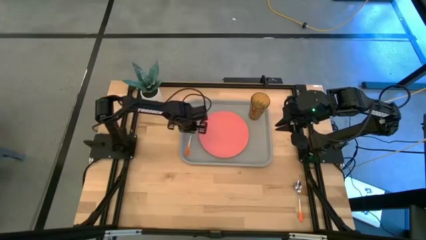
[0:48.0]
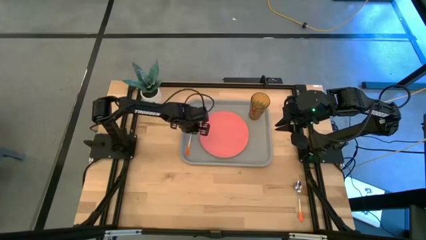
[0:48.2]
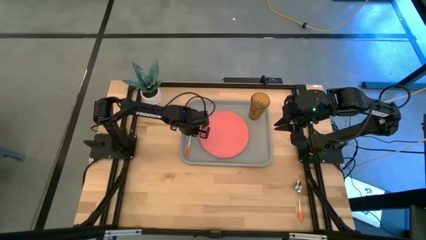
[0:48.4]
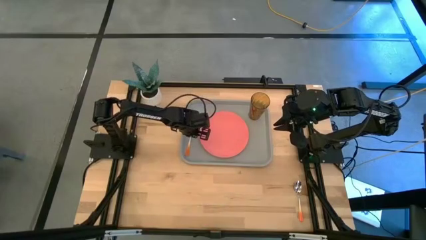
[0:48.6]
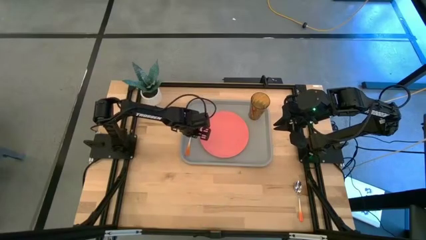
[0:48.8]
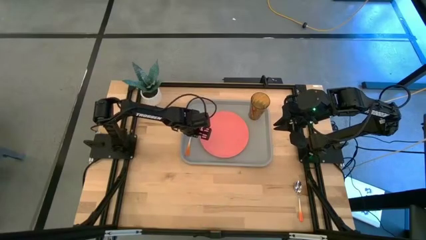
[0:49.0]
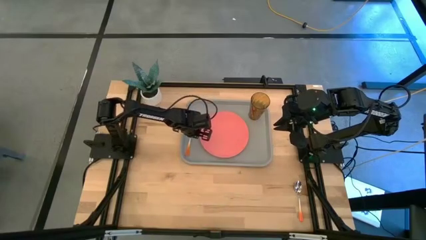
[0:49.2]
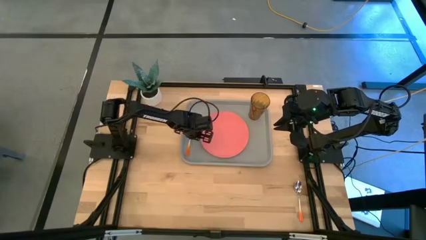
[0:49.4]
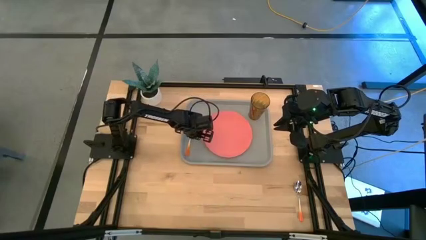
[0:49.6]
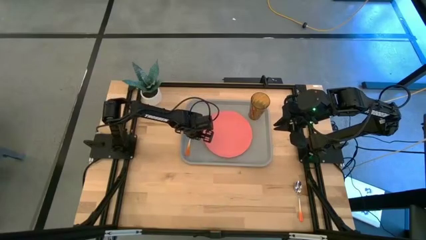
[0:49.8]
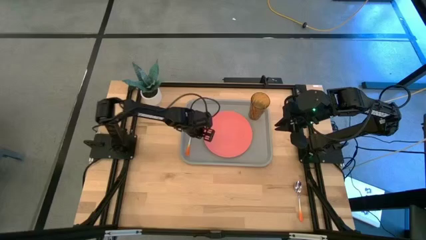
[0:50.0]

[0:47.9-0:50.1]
Task: Pick and place plate/cup/fork/spoon on tray
Adjust the pink plate on the gray serving tray

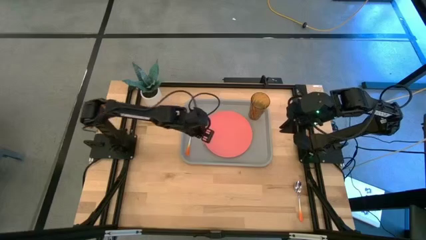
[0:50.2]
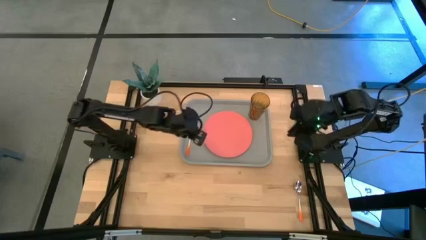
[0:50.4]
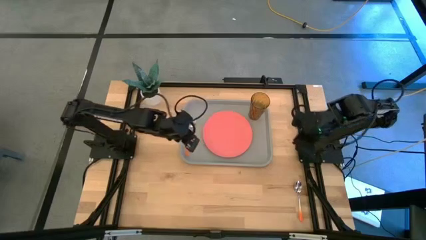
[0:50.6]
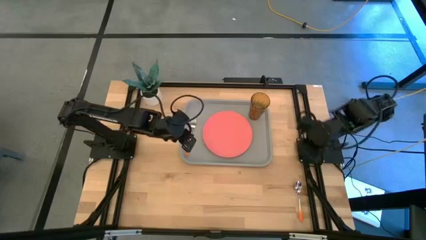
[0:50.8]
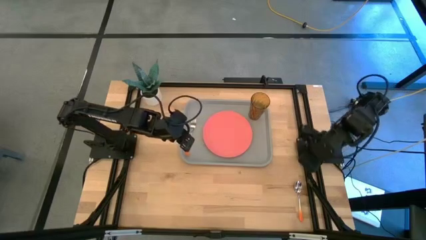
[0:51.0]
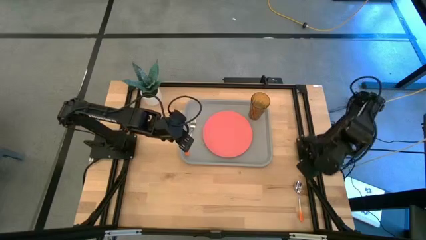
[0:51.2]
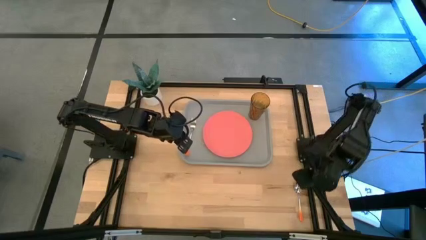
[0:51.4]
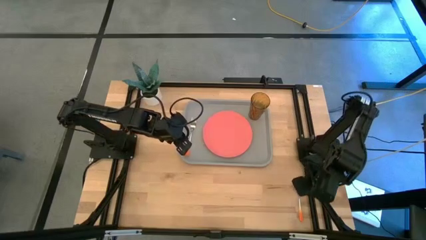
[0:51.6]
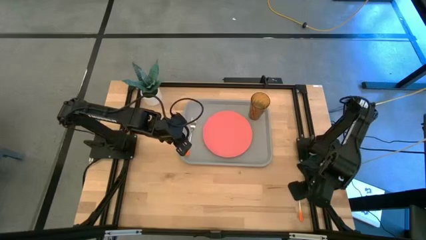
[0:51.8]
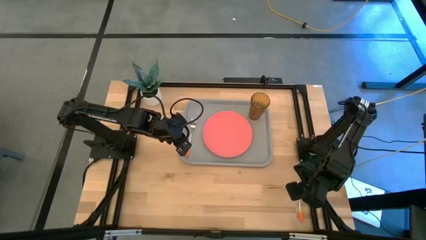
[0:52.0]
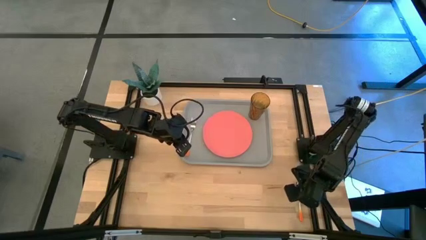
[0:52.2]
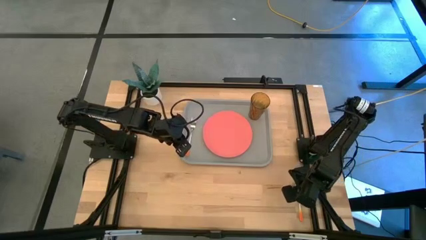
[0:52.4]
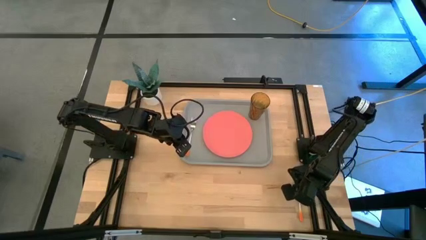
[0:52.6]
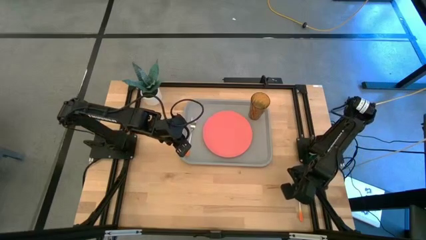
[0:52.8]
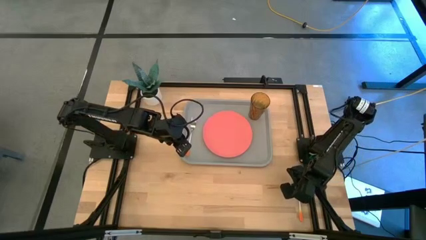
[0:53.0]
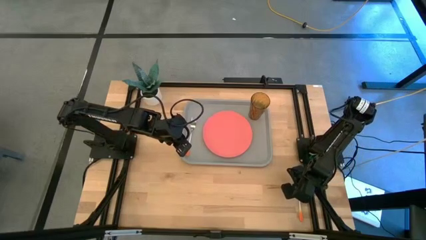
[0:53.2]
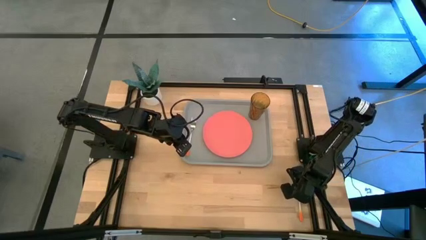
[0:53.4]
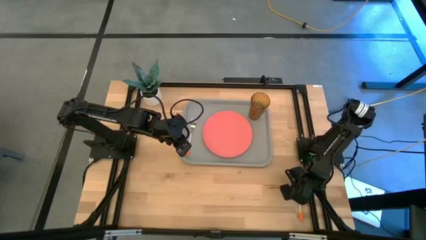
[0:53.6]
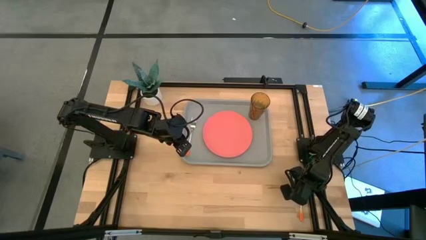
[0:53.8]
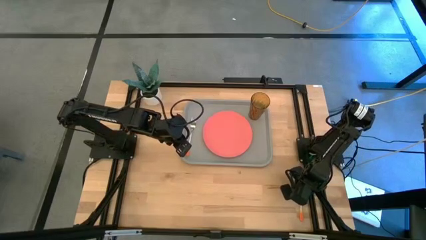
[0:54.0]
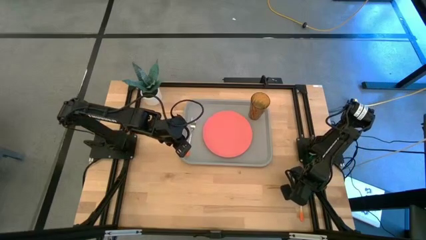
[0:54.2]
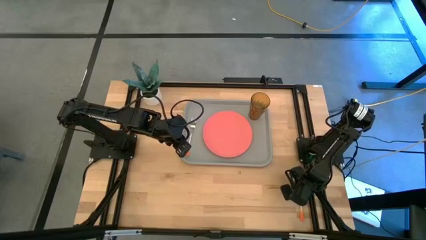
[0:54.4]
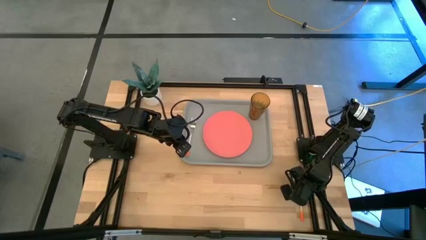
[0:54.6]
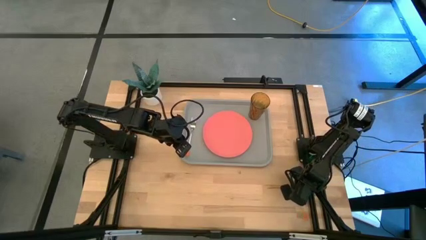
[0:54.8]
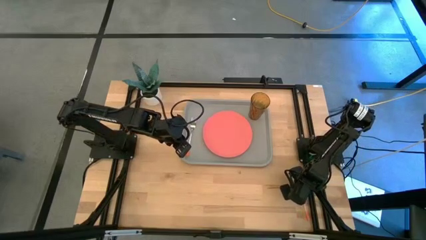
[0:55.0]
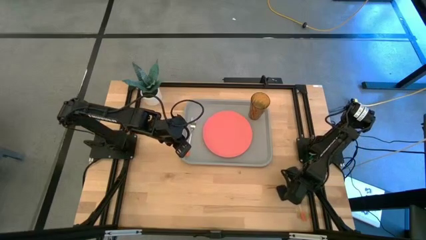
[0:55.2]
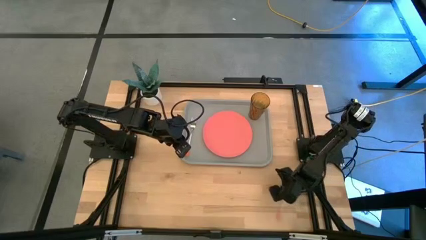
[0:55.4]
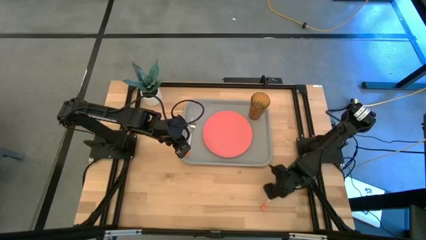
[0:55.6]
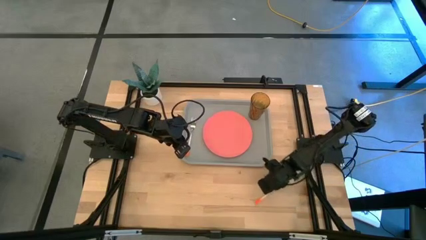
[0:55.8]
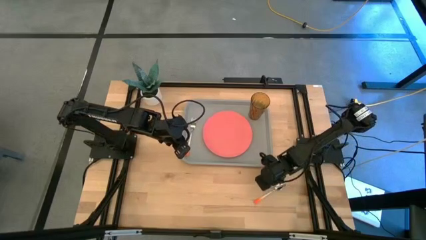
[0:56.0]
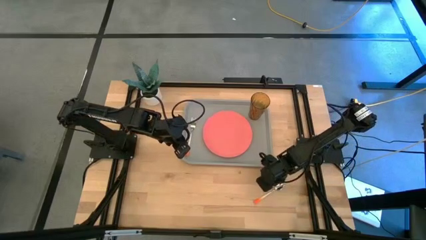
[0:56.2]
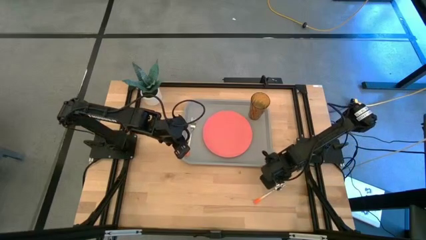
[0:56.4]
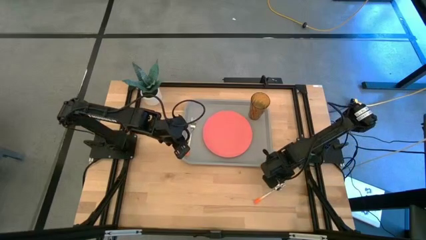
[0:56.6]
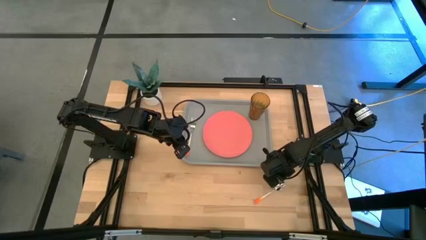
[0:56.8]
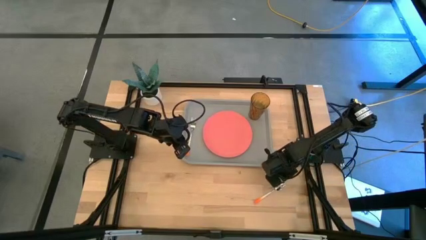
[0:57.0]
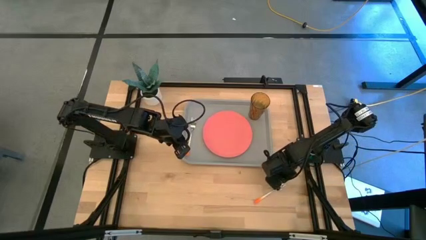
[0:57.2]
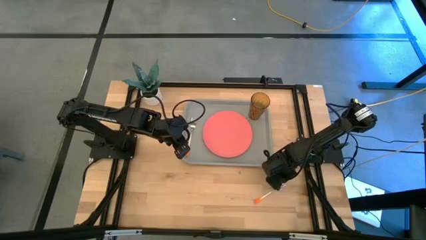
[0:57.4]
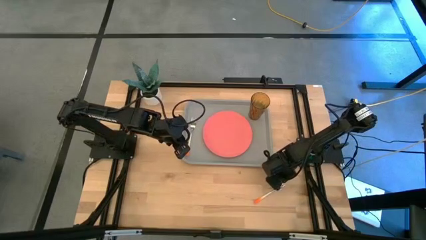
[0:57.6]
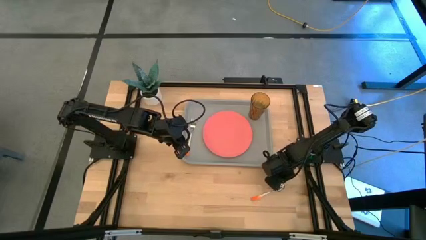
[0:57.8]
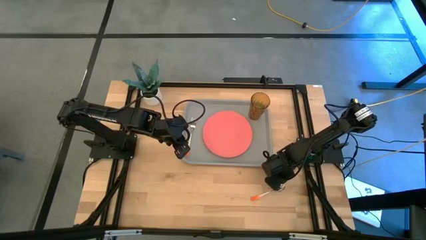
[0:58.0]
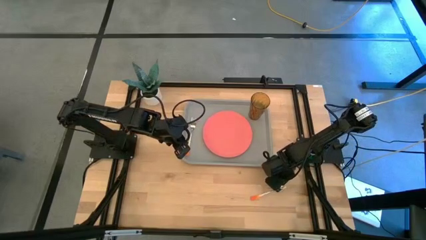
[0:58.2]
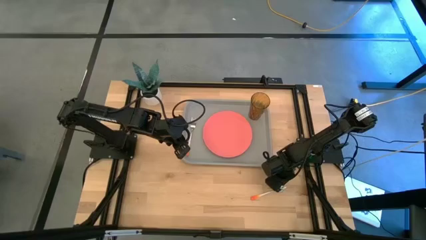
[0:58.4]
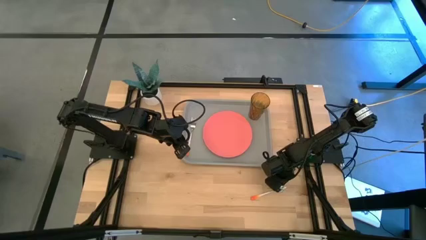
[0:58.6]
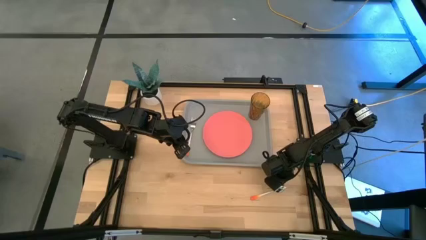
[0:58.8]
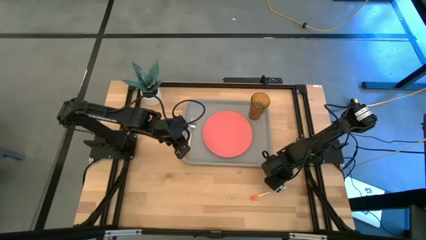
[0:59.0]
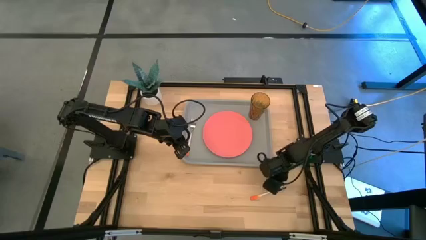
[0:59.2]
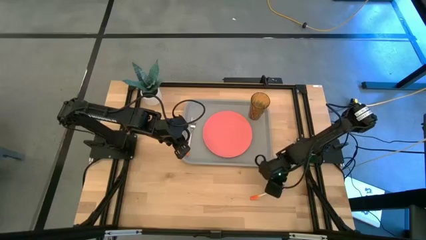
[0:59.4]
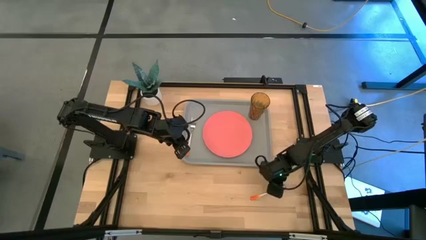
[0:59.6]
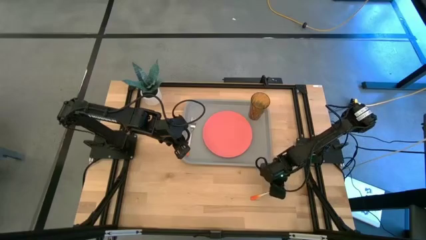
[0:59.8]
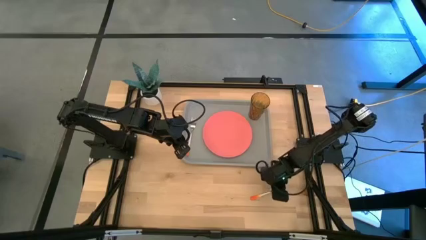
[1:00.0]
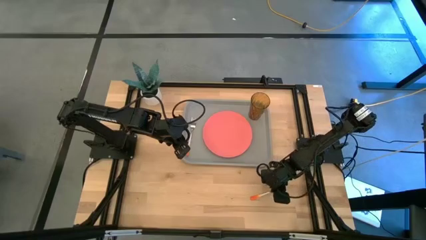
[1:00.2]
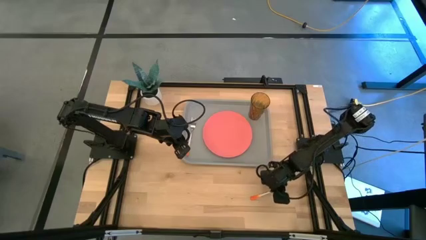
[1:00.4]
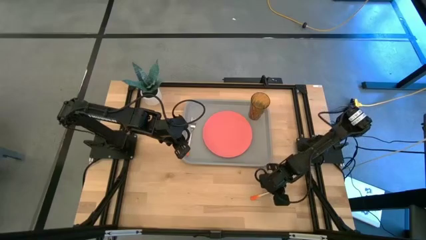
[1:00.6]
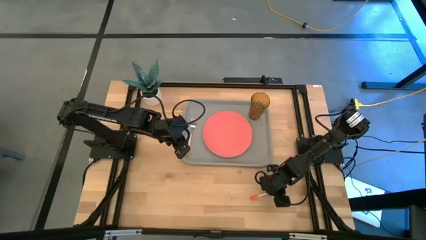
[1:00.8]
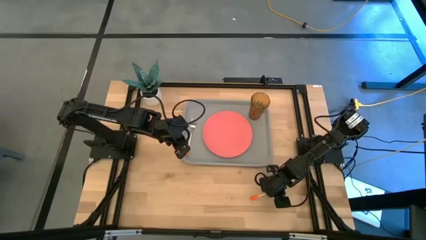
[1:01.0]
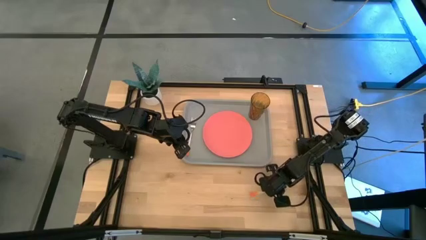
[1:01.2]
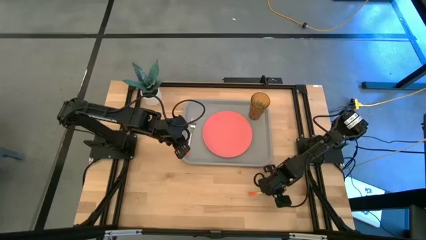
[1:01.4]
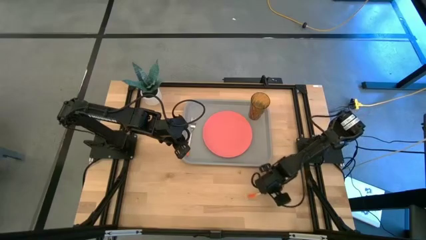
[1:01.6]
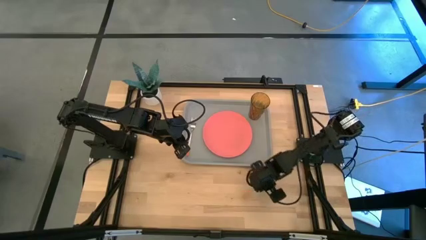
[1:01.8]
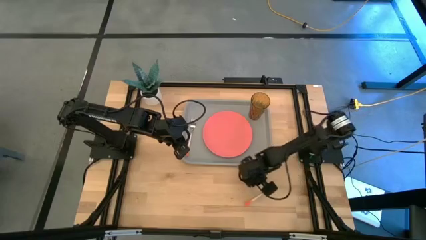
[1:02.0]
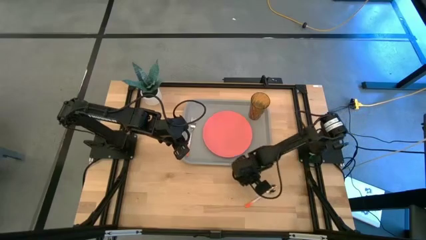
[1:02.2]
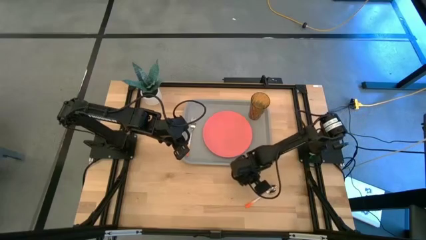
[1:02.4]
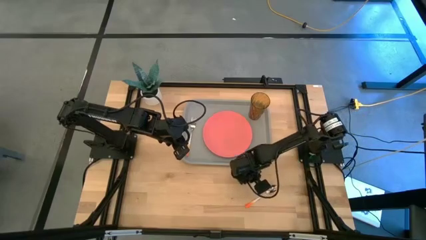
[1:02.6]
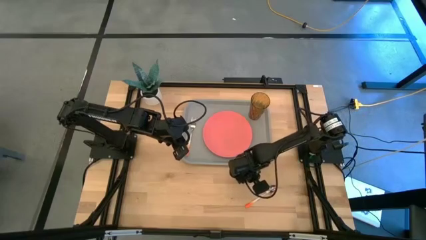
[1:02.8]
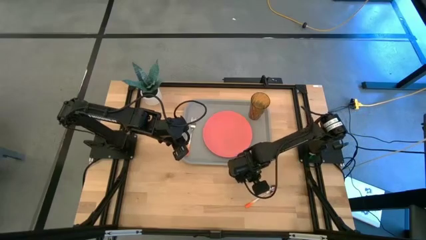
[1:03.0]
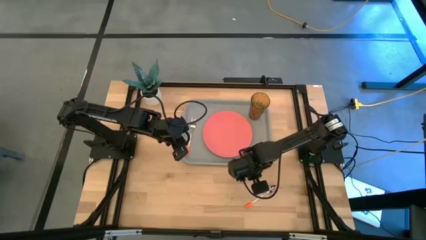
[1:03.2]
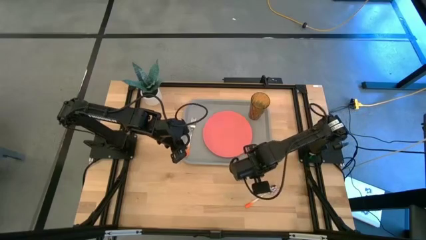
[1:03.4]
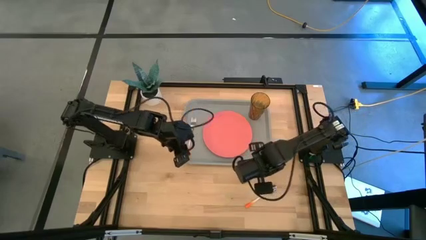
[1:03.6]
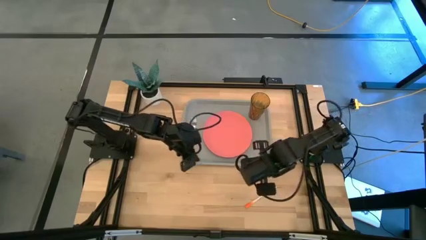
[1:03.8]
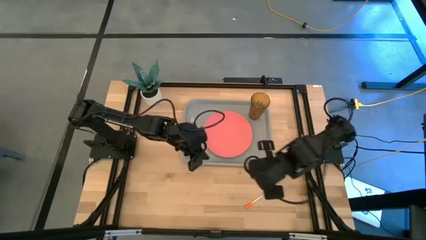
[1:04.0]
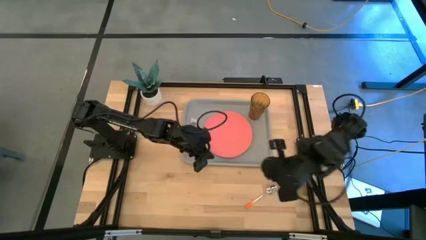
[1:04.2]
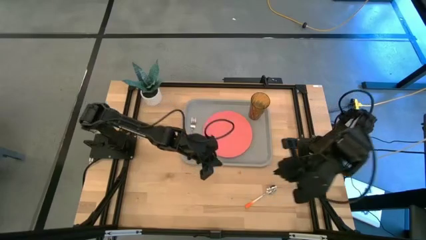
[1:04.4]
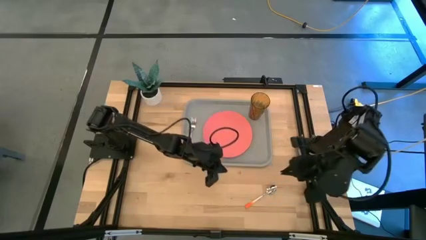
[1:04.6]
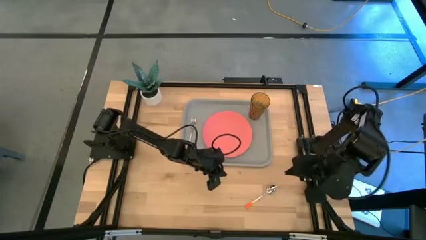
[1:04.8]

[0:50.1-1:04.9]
Put the orange spoon on the right side of the orange fork on the gray serving tray
